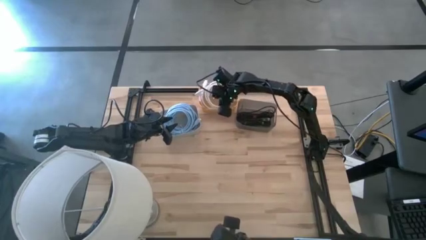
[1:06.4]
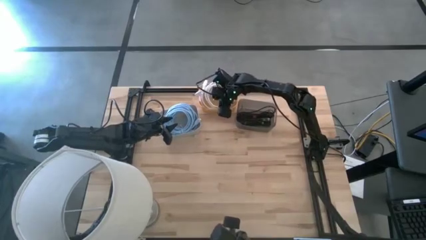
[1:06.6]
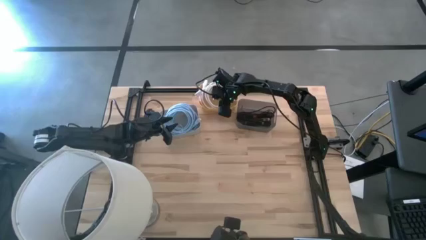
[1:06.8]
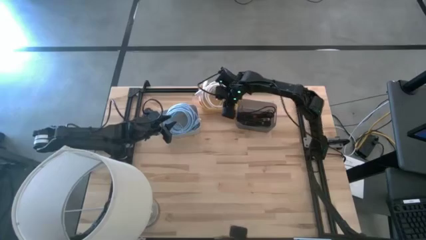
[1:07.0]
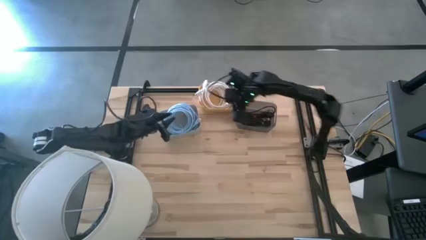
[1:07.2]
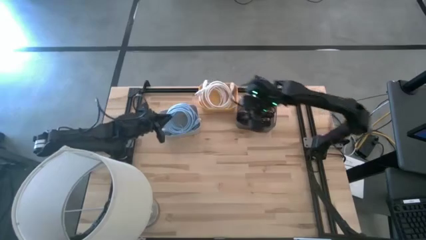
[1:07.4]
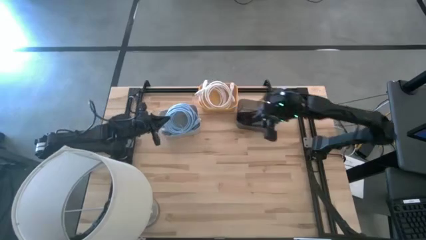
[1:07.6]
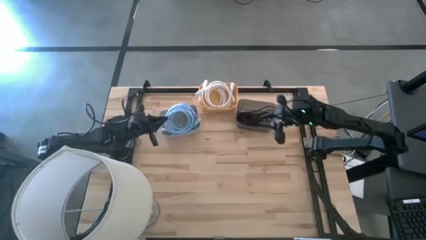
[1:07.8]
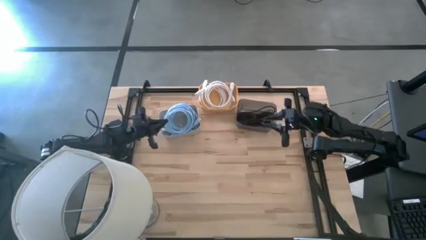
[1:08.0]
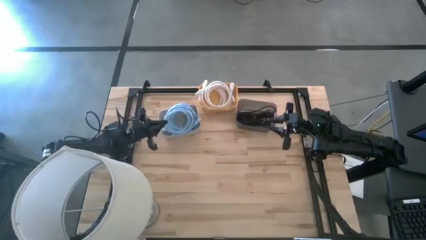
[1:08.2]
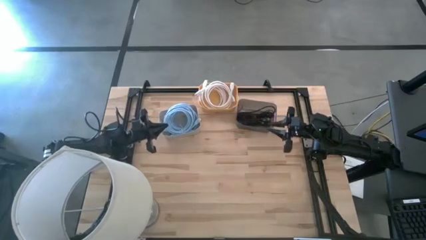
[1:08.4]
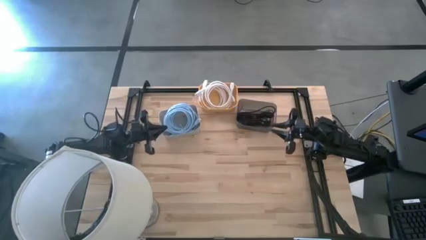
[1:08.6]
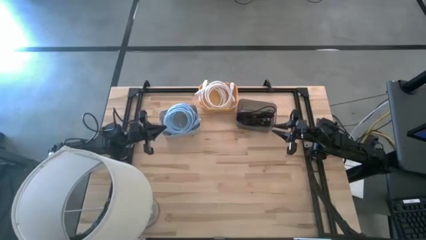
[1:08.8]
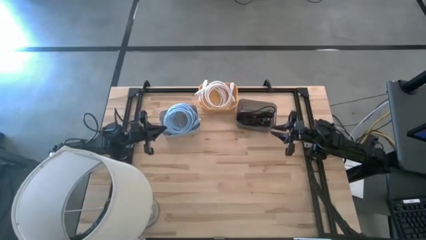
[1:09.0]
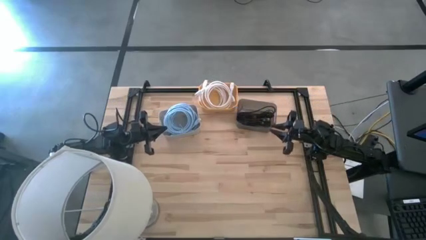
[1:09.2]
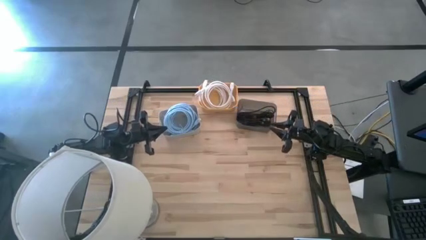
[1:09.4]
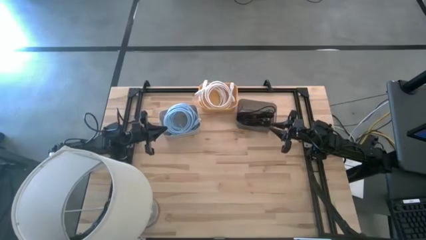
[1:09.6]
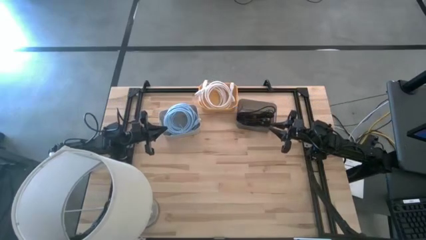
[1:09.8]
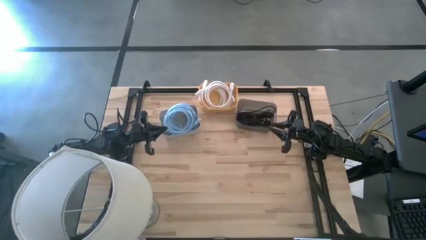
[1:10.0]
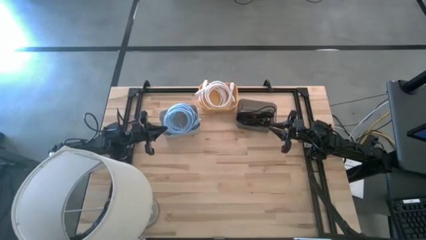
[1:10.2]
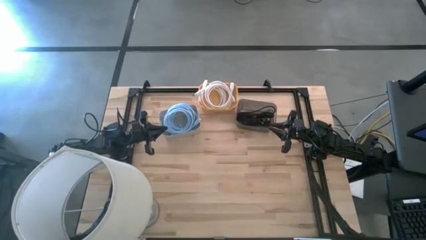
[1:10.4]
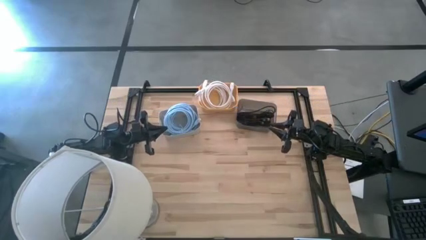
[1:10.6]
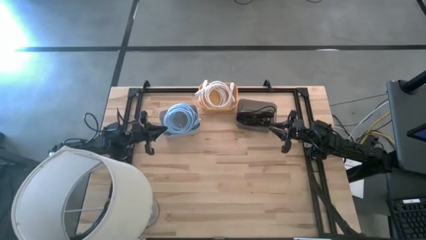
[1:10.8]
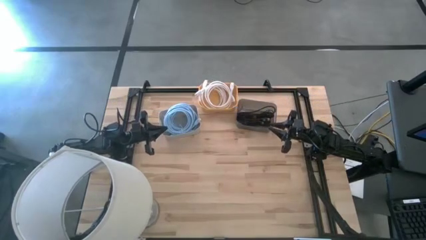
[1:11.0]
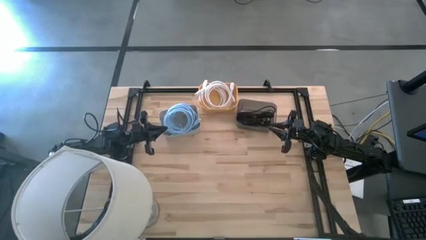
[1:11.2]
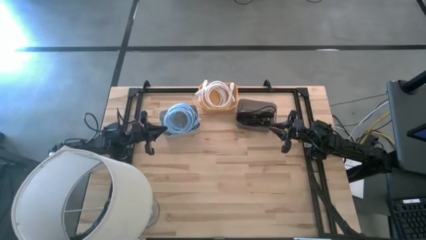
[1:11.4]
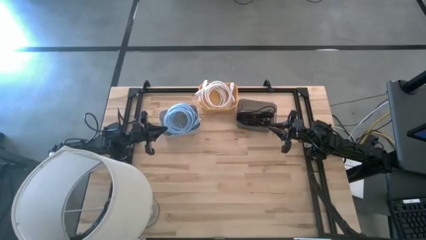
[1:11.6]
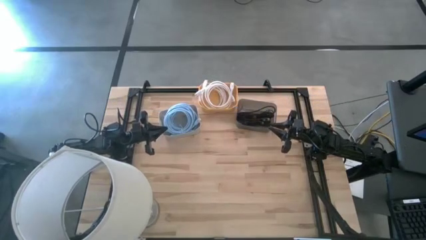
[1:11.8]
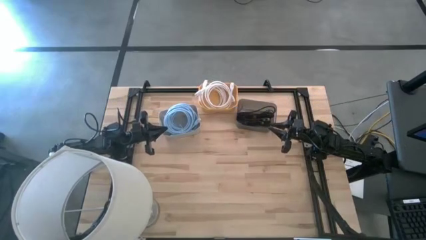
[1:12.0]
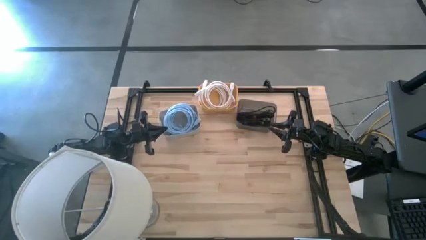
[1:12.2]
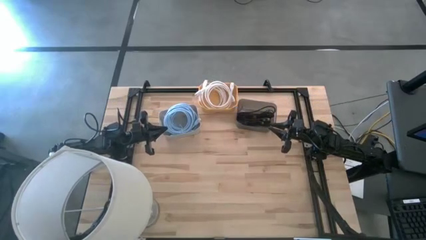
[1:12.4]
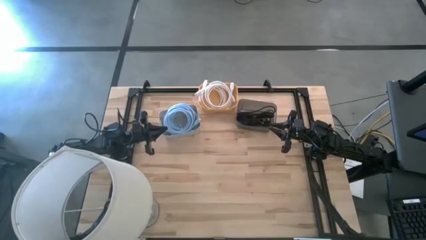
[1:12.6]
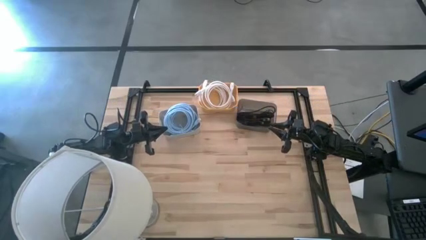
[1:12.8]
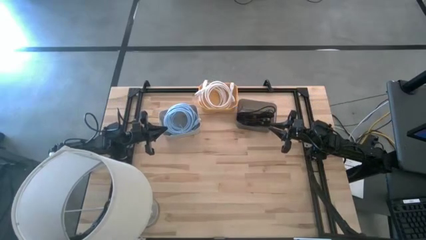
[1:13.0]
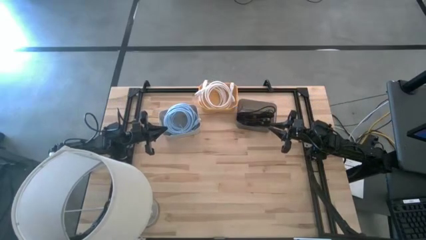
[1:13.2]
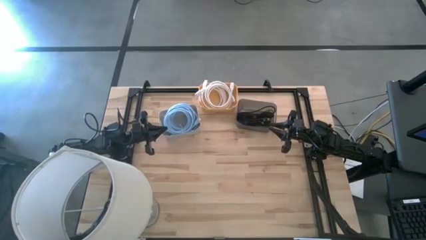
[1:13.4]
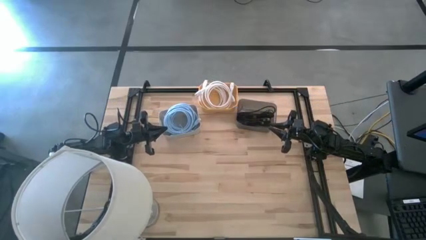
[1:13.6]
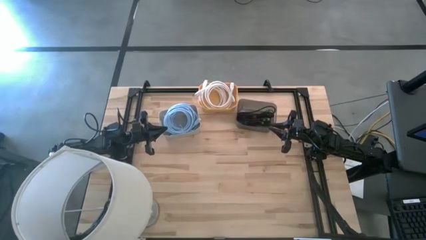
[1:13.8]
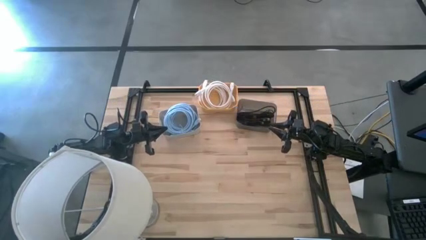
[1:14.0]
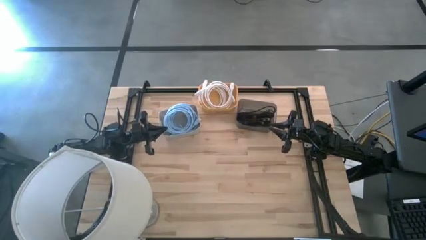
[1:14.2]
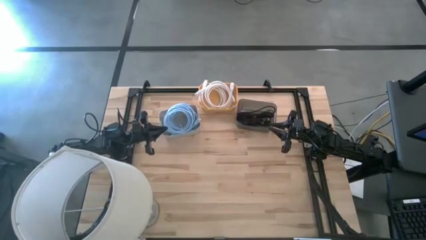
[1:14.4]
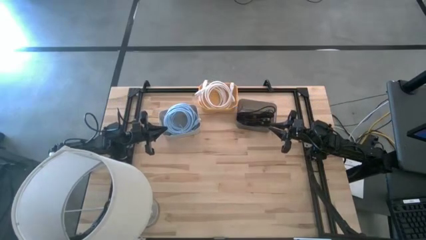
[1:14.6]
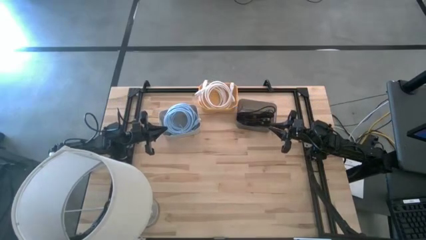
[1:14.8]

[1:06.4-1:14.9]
Task: Pick & Place USB Port
Return to Home Position

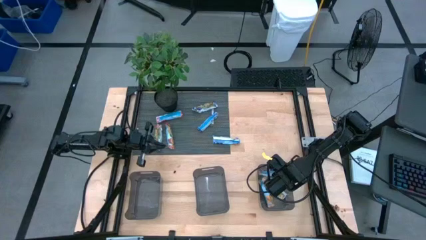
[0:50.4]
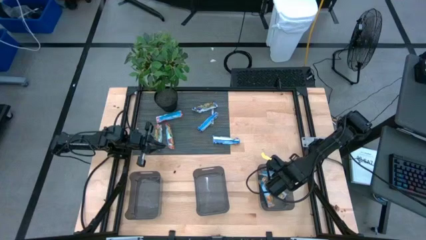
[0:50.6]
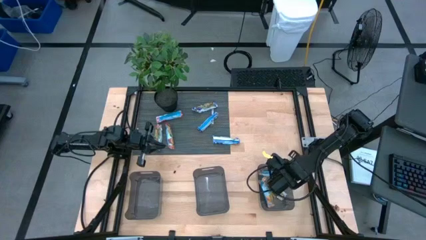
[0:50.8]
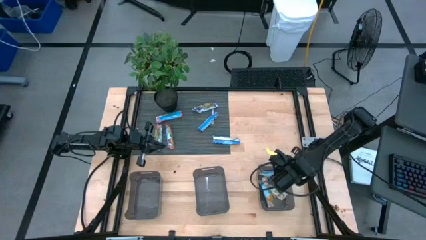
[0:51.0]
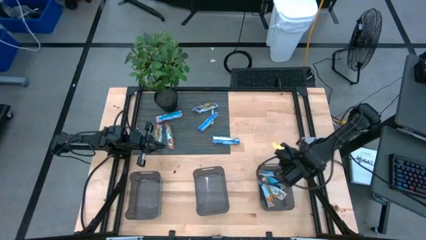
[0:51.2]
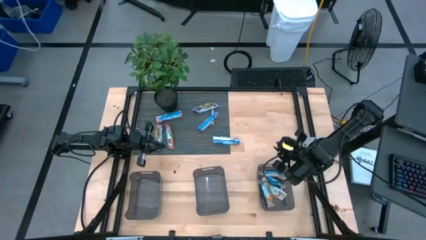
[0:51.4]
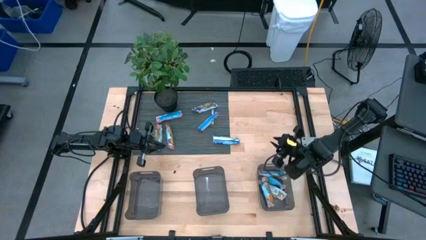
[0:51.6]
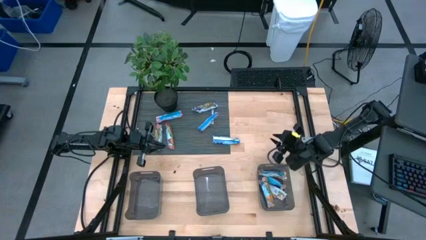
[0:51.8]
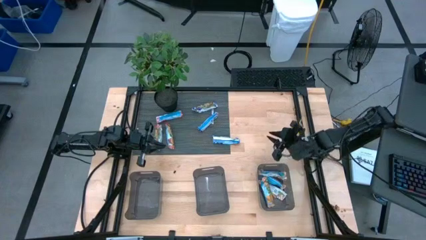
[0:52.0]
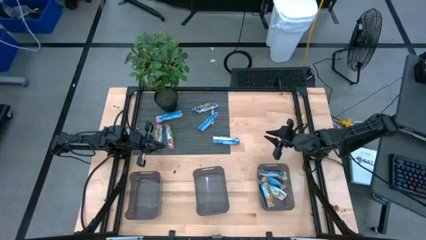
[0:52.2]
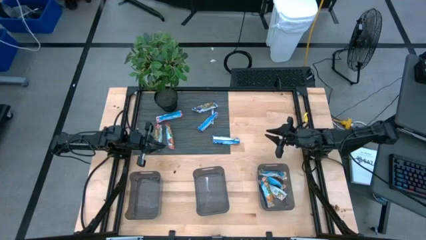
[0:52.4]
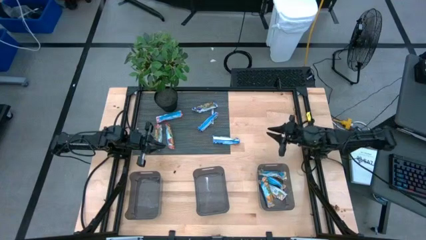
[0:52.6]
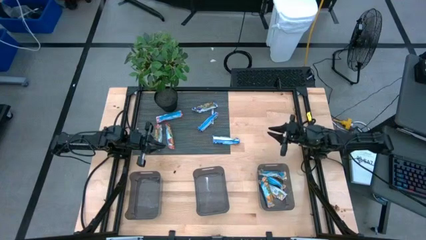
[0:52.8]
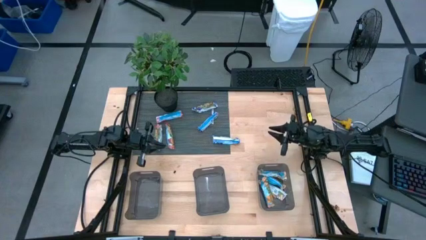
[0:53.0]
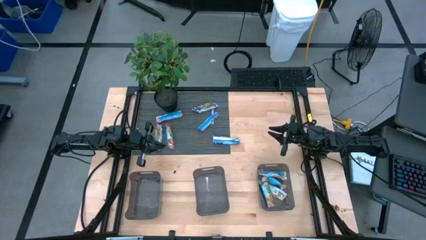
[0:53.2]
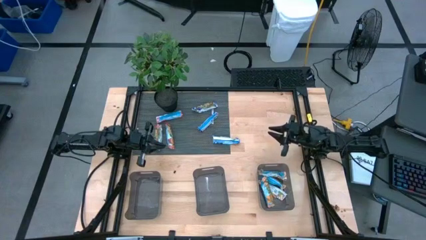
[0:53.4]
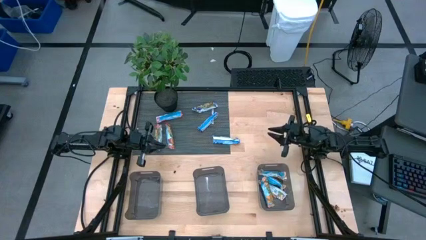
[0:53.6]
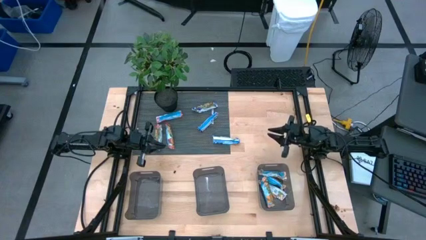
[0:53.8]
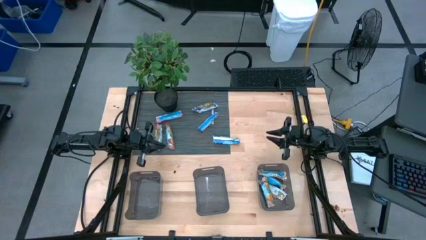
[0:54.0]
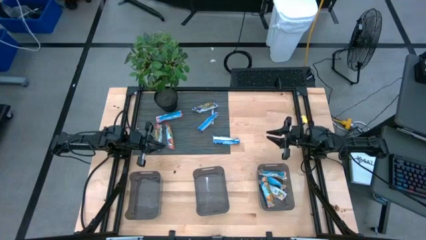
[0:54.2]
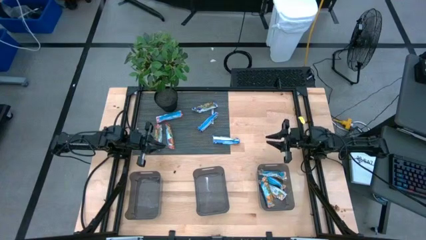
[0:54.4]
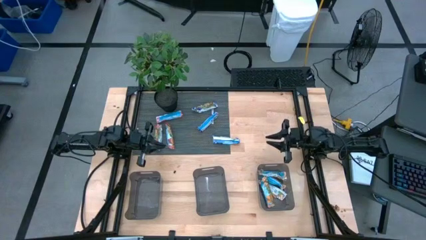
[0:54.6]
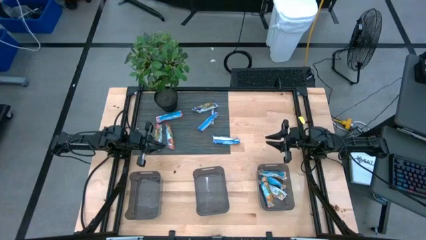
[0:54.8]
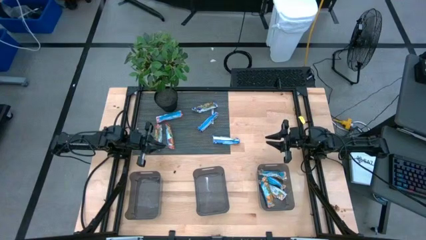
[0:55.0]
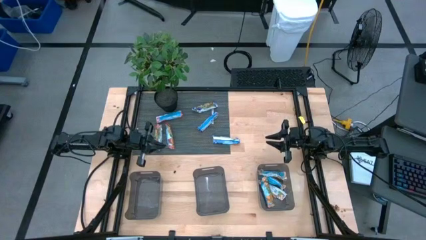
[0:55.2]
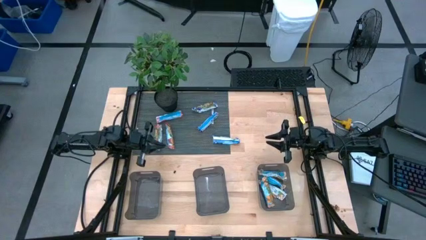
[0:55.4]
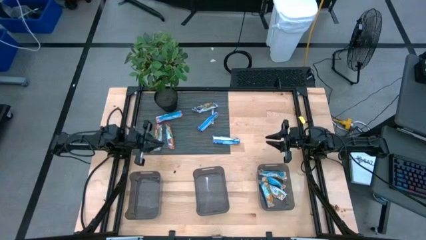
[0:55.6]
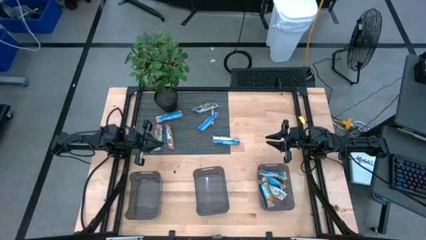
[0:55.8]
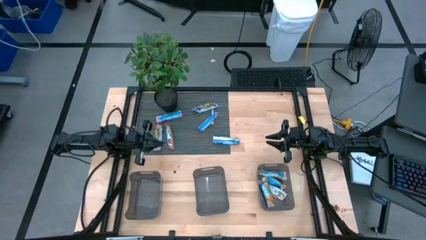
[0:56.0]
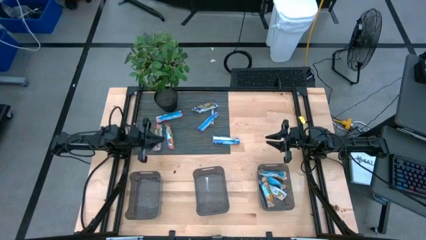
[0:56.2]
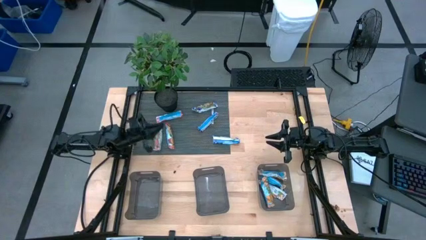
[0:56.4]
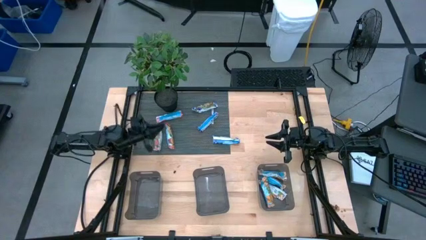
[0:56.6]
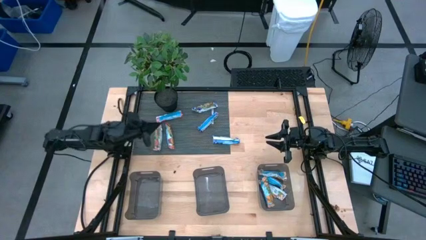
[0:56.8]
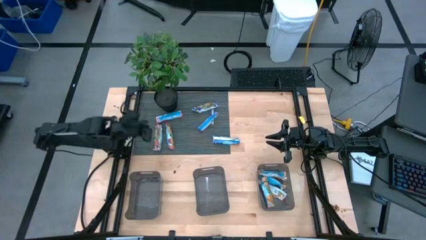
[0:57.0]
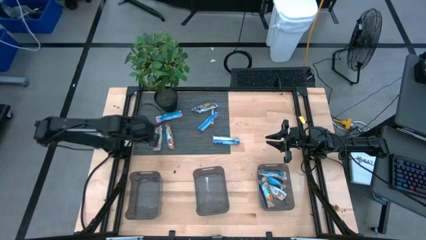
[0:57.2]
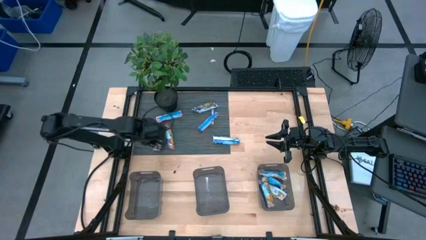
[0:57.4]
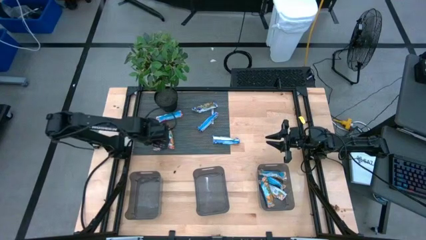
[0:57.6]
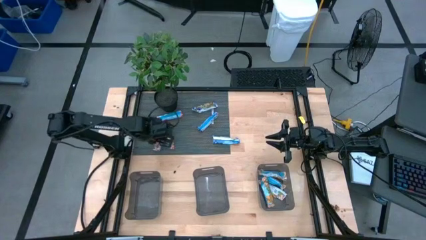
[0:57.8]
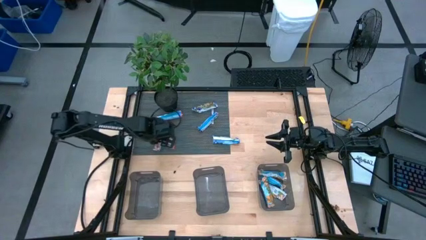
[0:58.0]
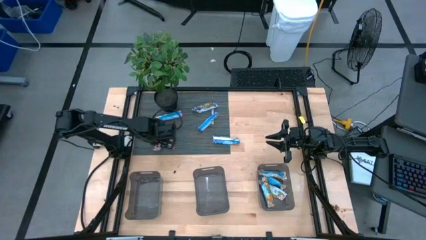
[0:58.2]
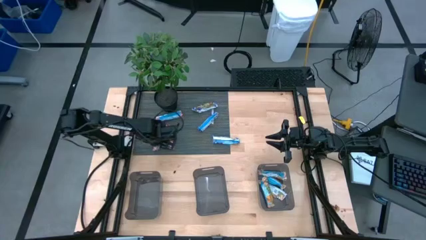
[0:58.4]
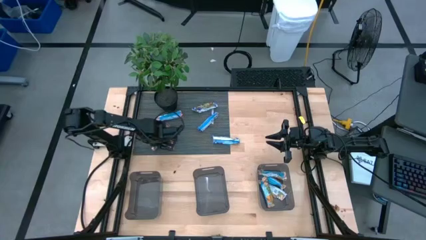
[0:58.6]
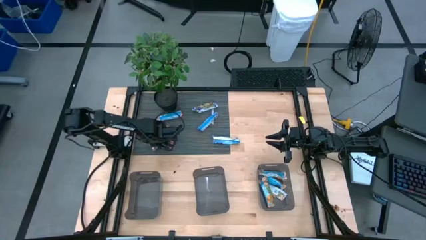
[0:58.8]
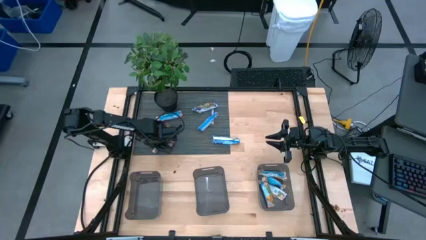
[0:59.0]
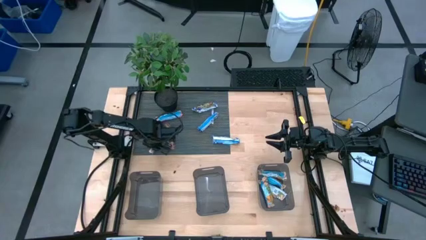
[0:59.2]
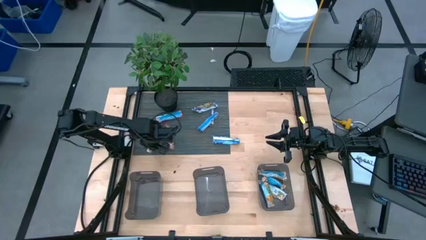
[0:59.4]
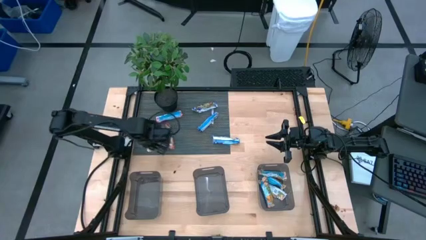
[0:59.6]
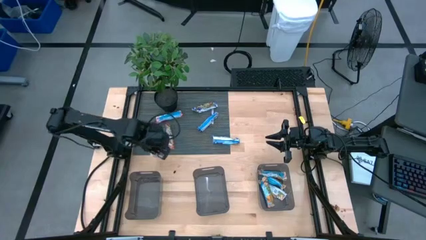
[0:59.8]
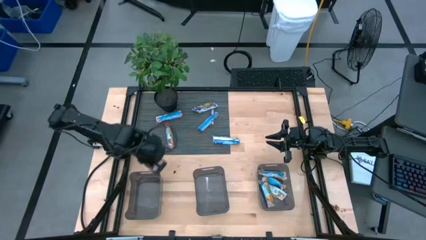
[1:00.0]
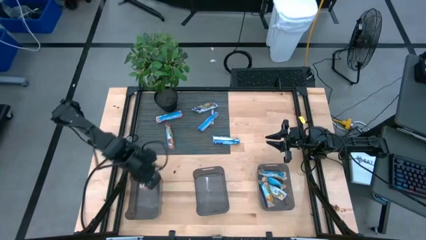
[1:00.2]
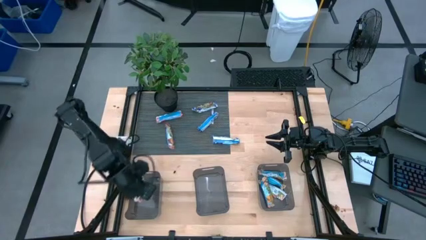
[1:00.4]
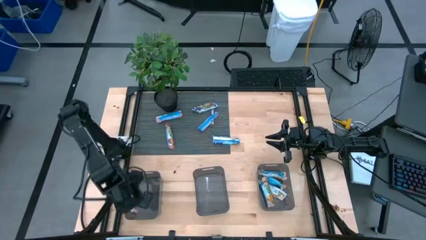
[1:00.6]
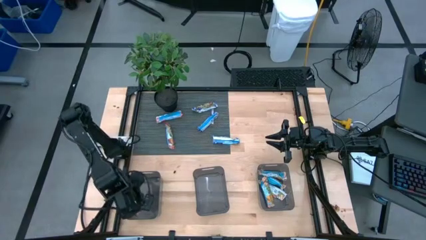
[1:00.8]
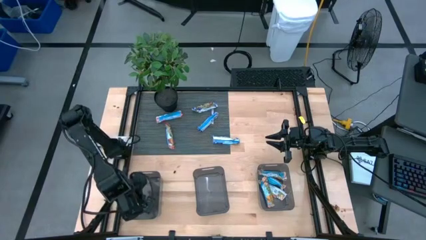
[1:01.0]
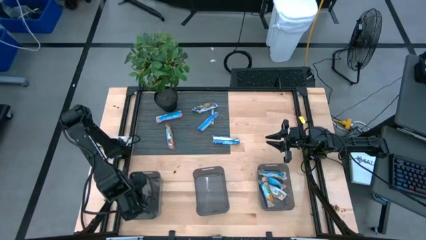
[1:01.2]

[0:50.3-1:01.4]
Task: Pick and place Granola Bars by type
Put the red granola bar into the left black bin
